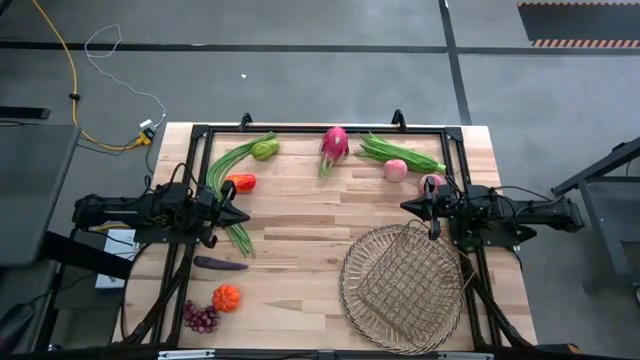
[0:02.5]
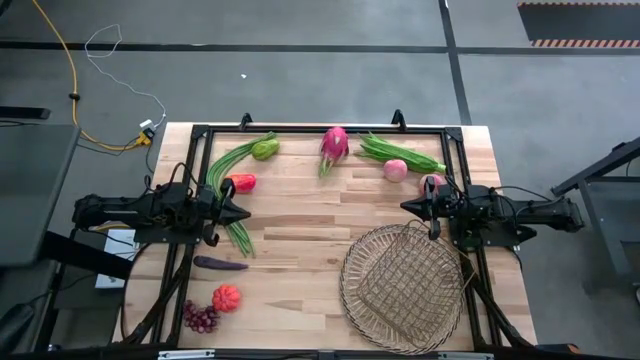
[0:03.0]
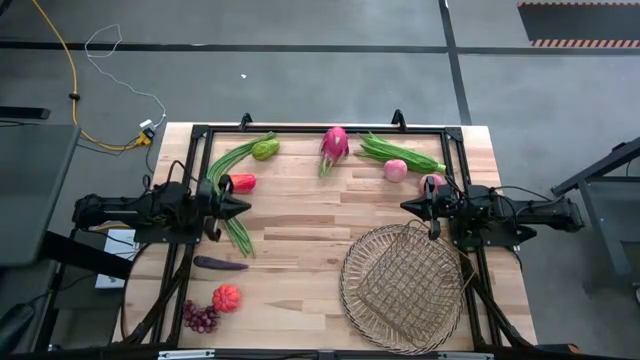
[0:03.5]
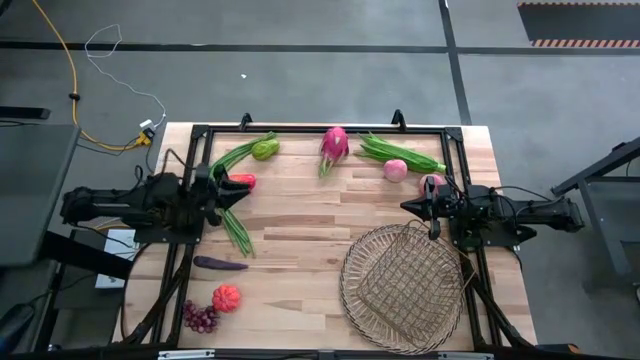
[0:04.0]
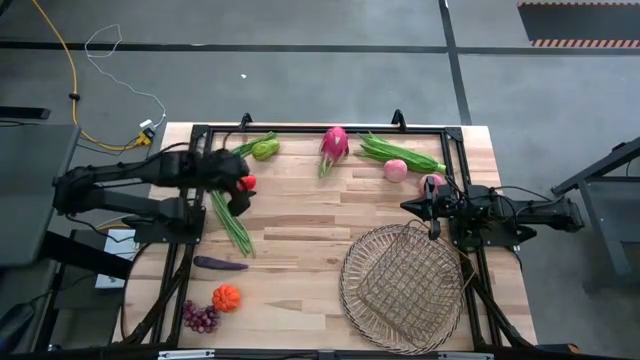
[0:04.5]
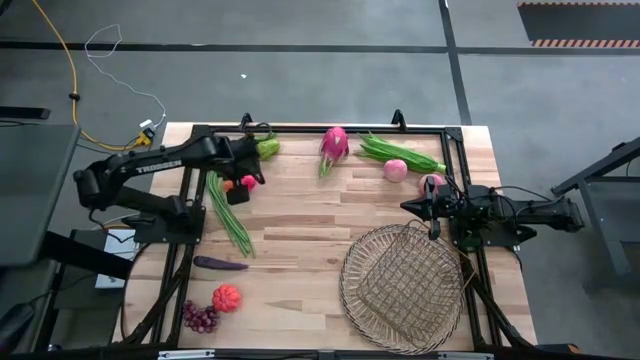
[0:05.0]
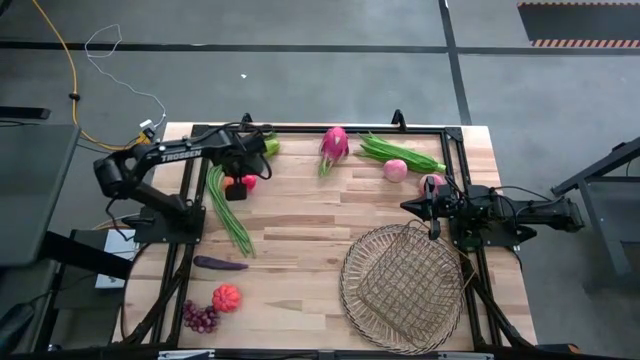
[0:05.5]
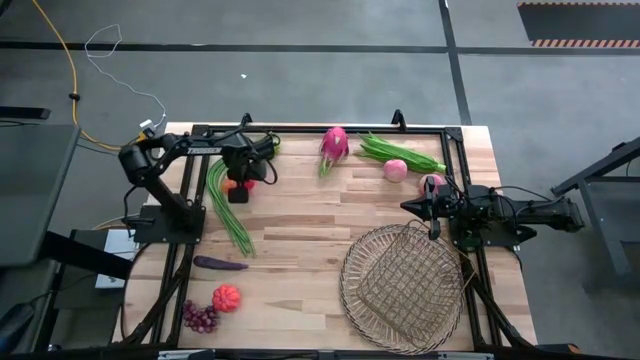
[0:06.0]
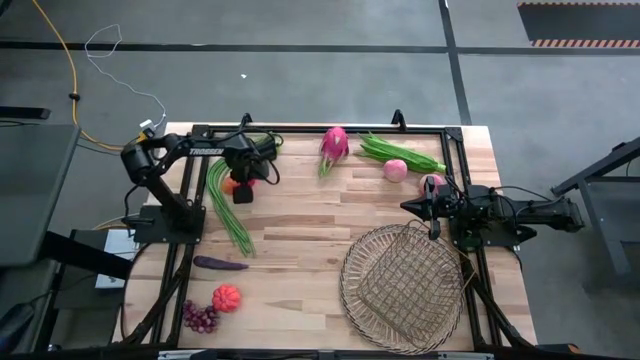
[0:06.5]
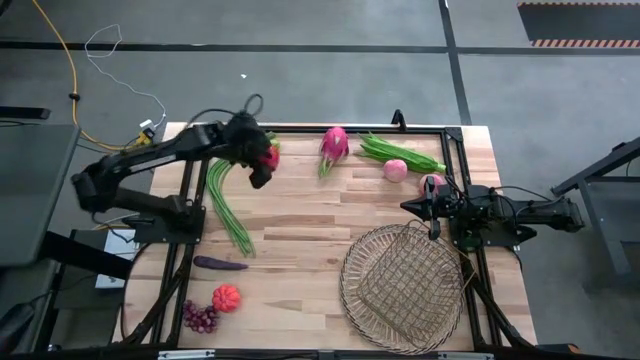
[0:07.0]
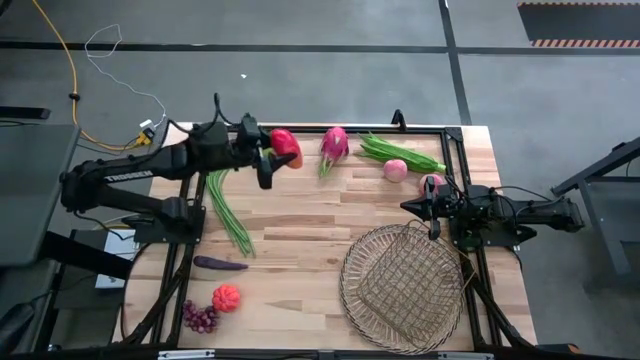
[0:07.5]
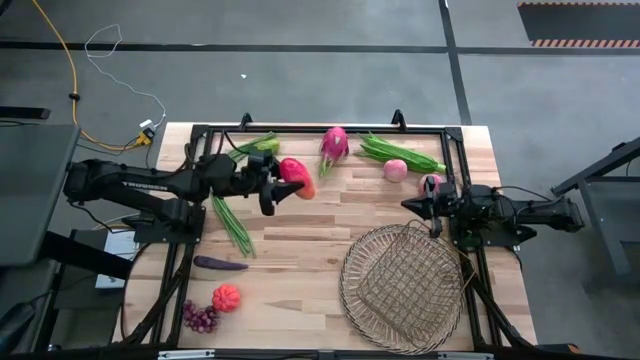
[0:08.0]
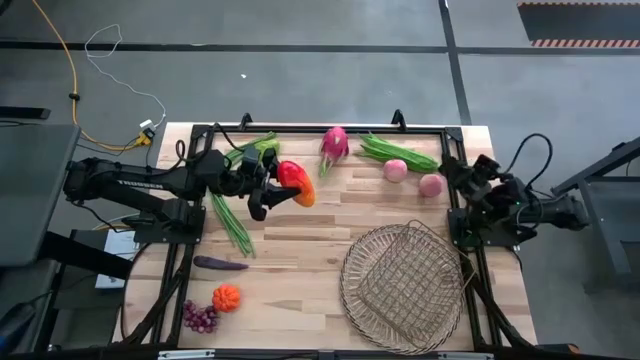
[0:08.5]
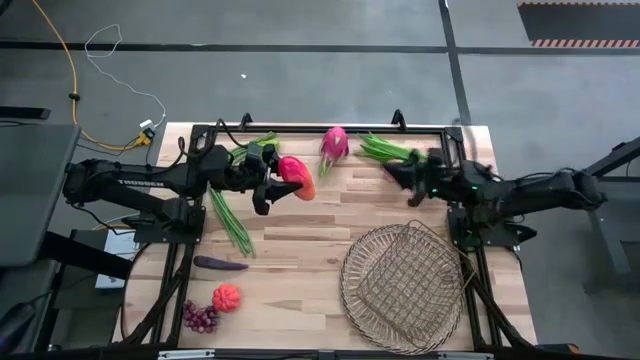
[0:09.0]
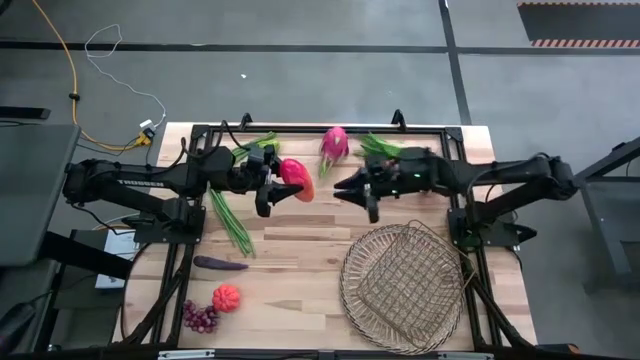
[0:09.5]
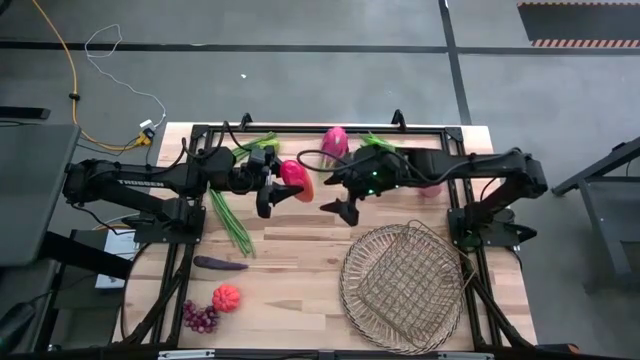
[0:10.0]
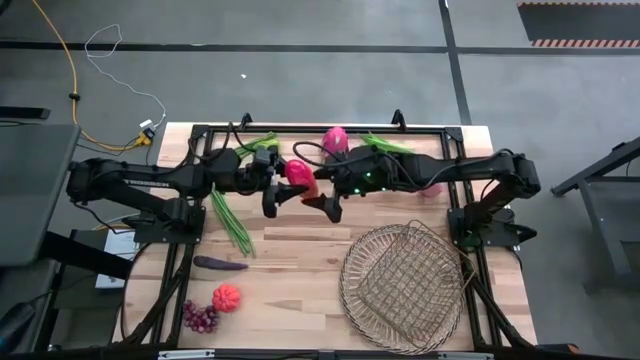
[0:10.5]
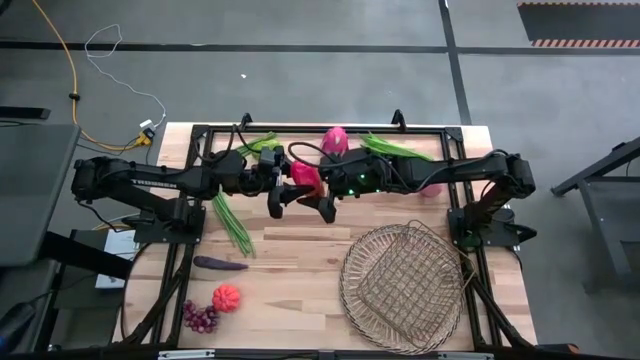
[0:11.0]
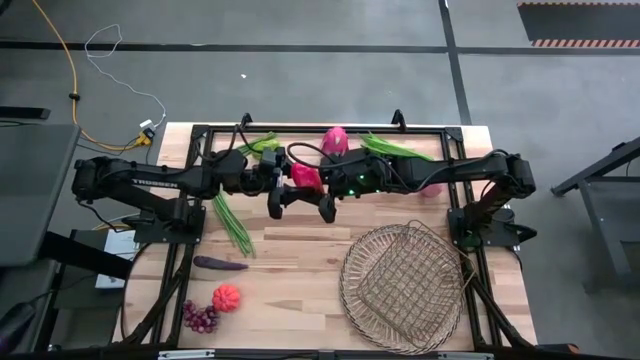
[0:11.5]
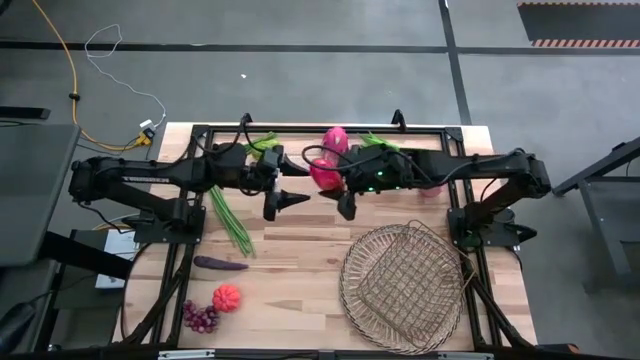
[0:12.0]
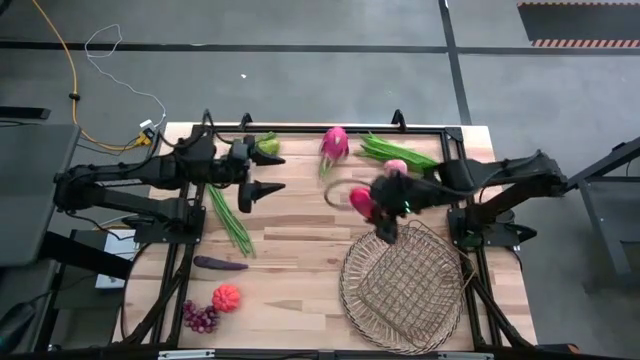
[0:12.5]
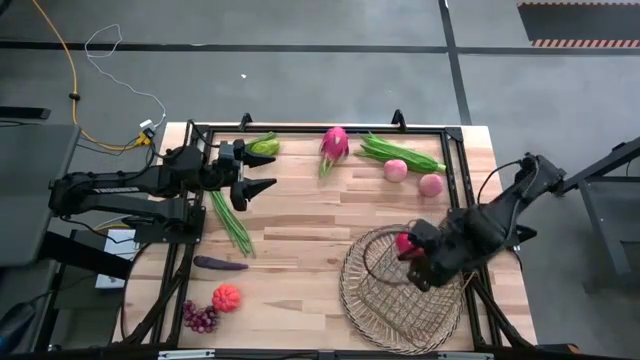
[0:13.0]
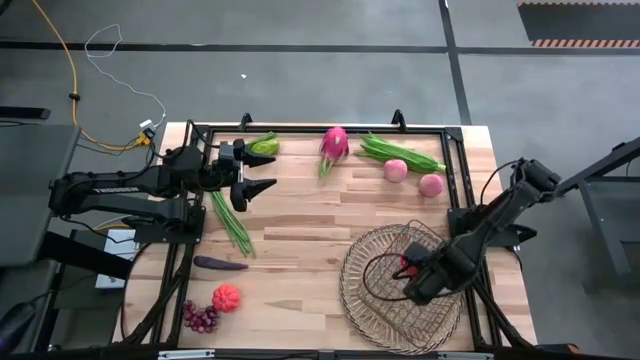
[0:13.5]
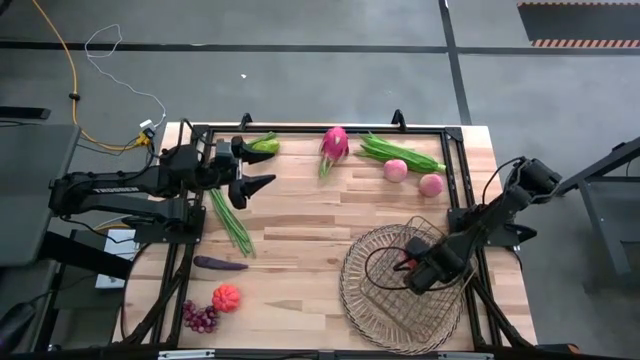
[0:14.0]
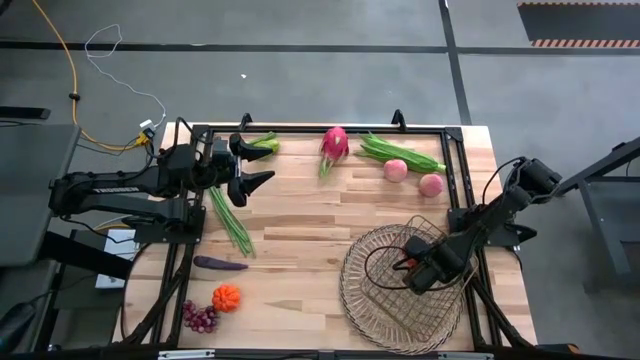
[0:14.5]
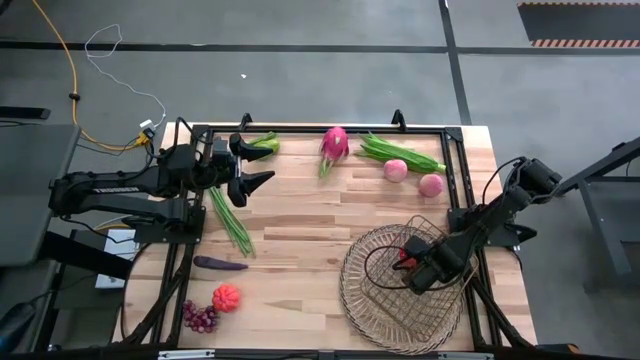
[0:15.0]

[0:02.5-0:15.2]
Task: Build produce basket
Put the mango into the wire basket

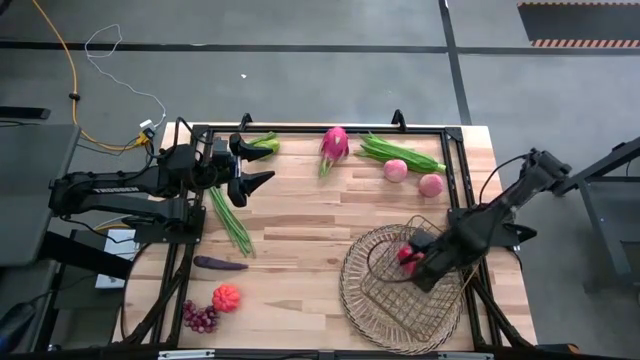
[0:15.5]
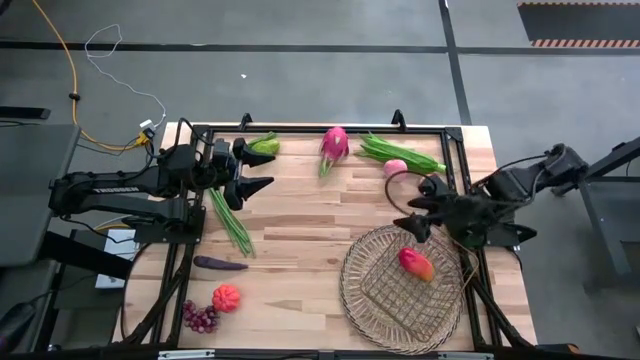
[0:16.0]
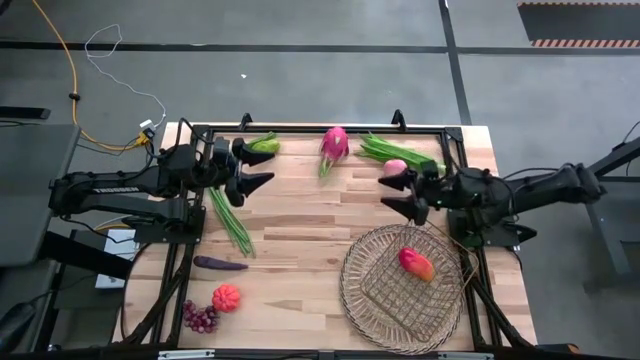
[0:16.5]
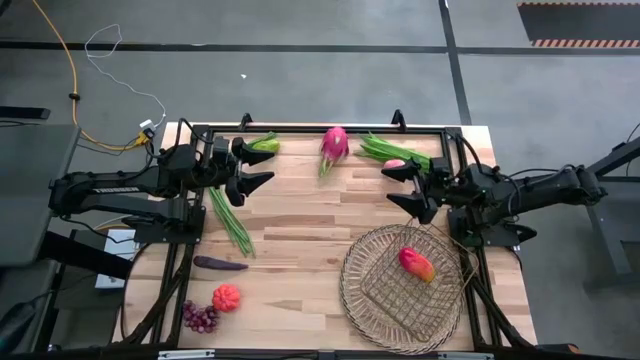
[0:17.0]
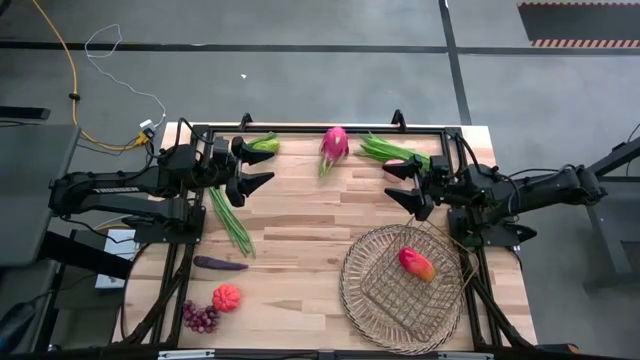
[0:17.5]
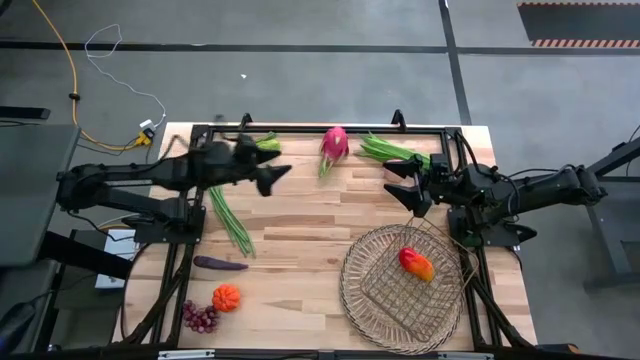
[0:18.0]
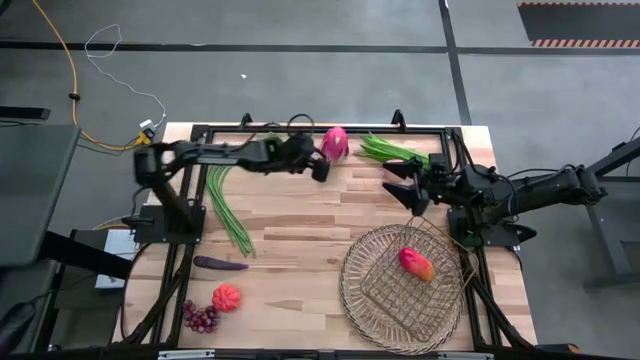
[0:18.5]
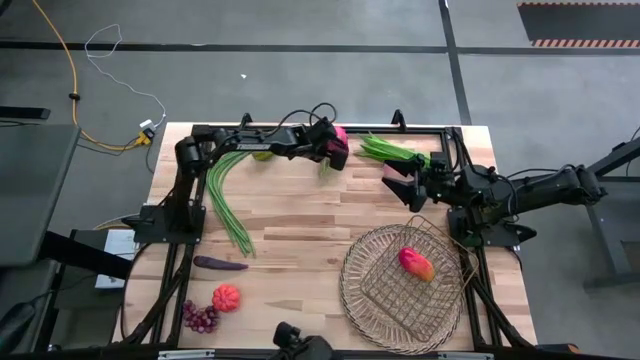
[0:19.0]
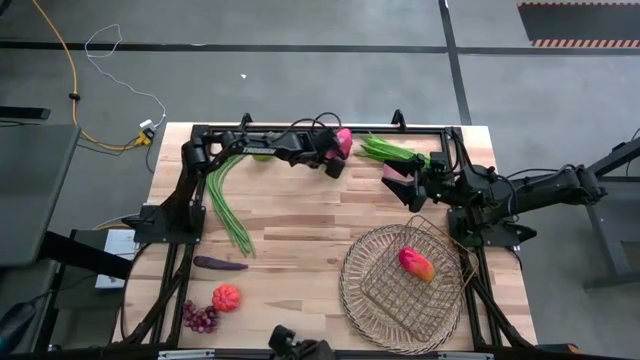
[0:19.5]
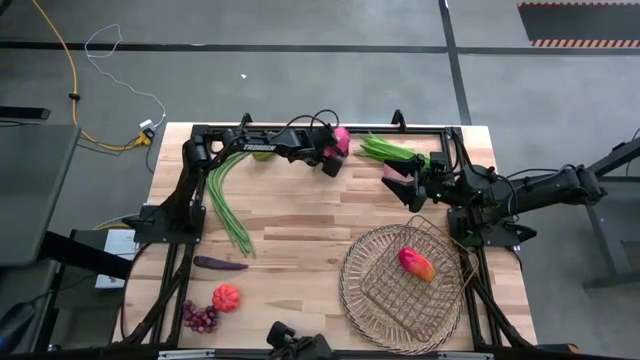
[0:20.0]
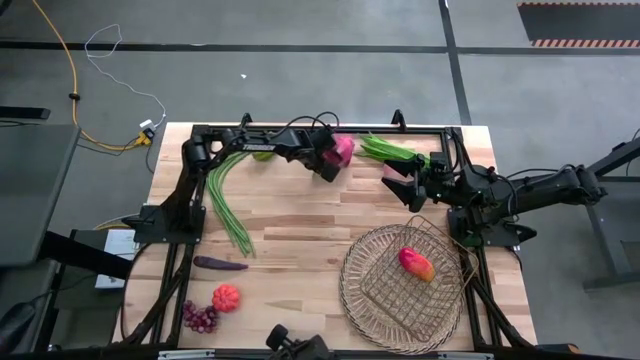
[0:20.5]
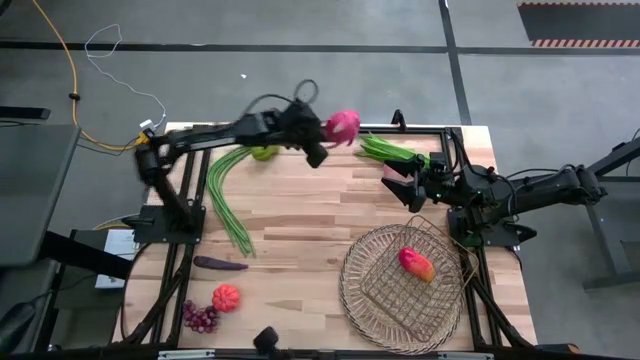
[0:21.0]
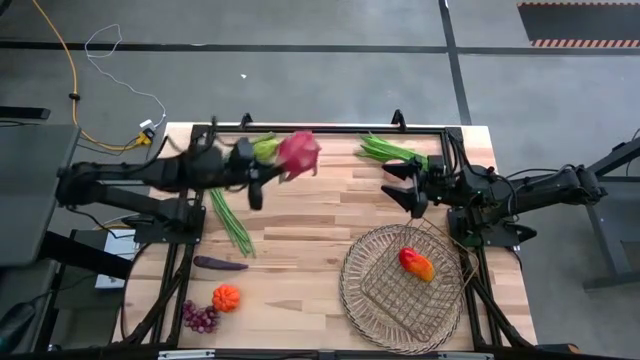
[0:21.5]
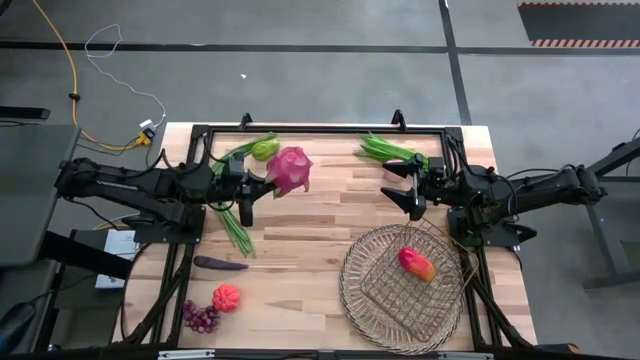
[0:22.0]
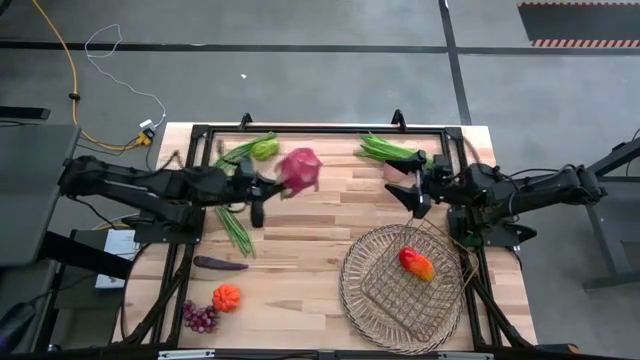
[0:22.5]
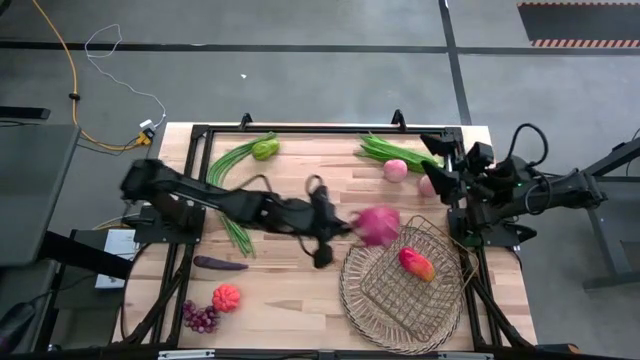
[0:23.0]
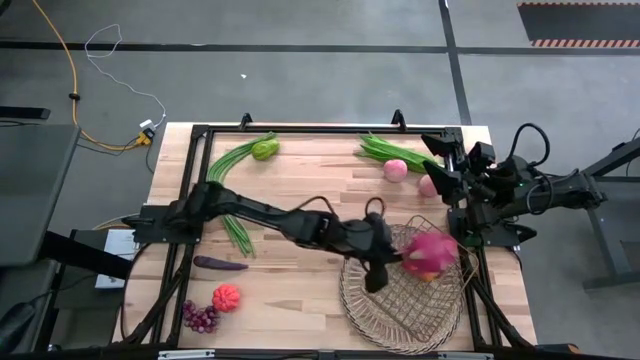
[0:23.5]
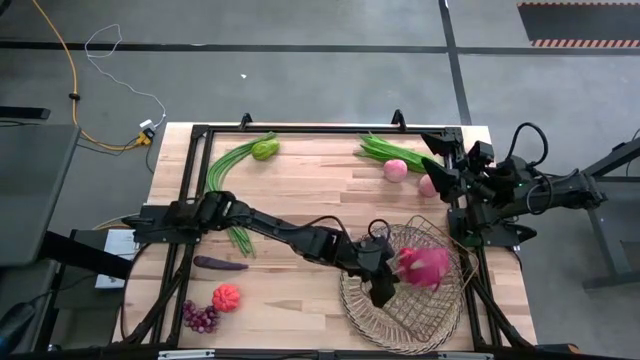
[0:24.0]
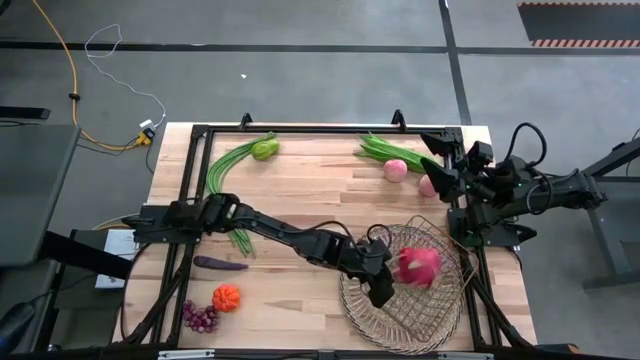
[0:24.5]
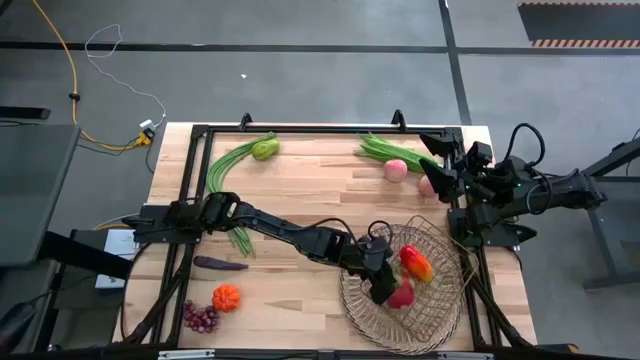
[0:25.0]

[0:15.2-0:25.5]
Put the dragon fruit into the wire basket
